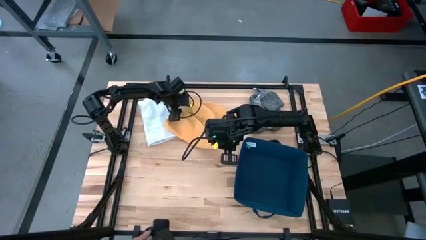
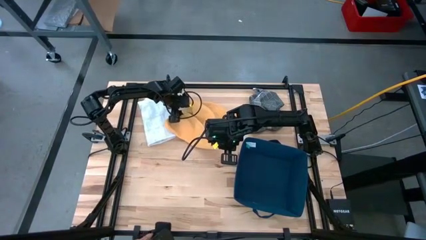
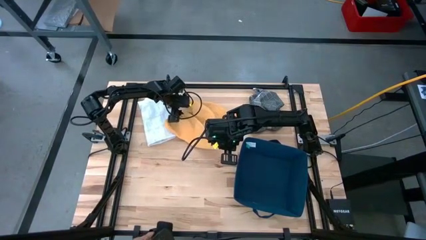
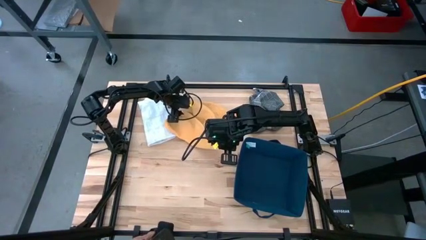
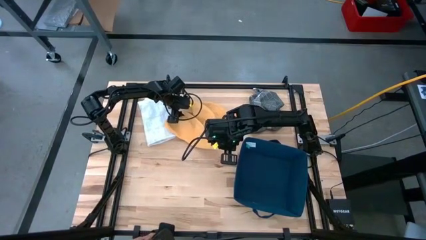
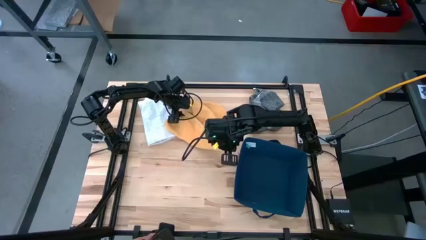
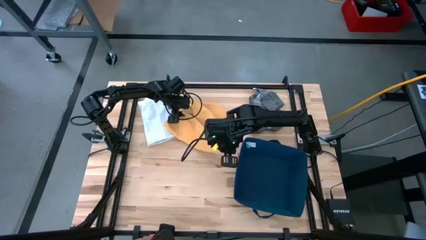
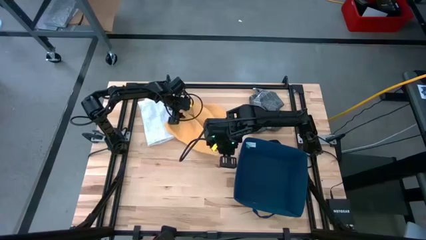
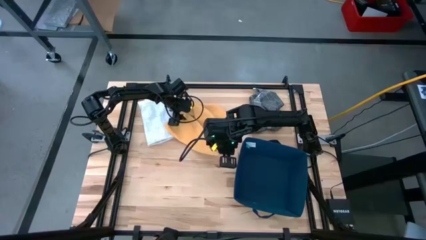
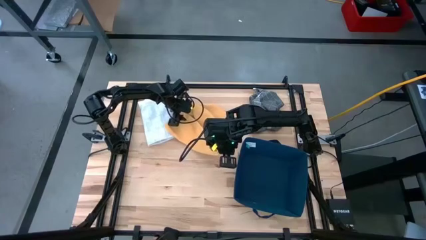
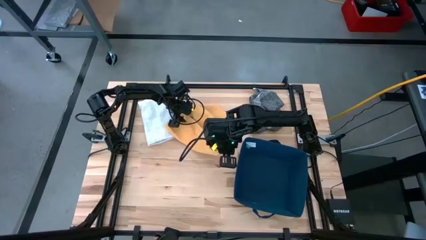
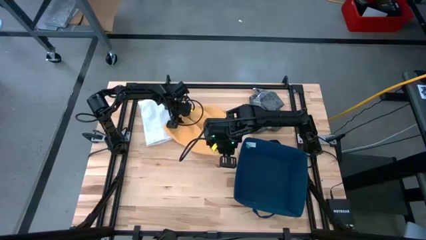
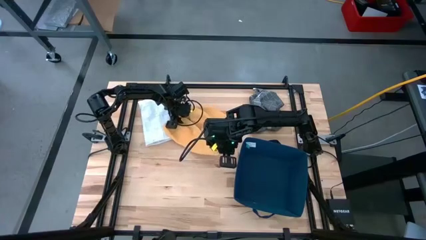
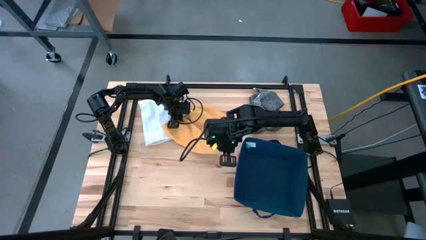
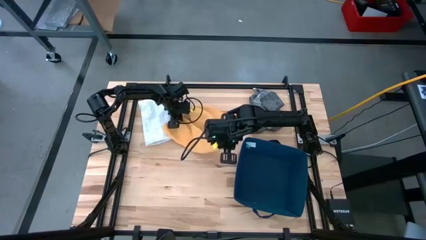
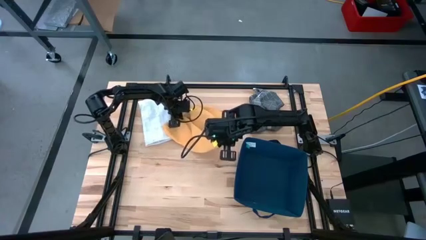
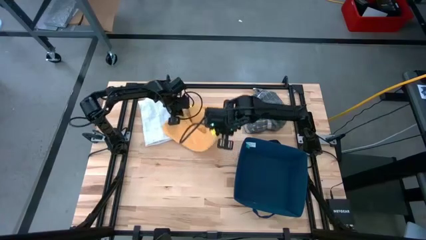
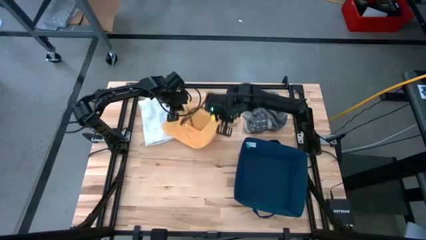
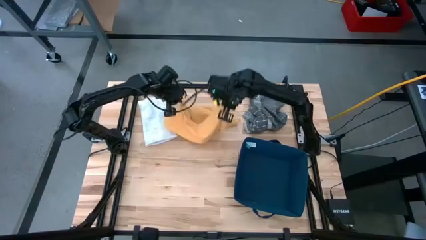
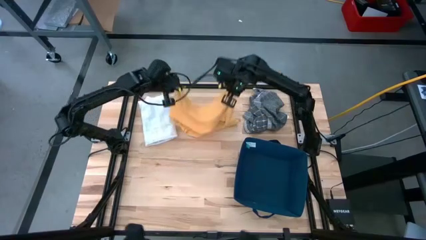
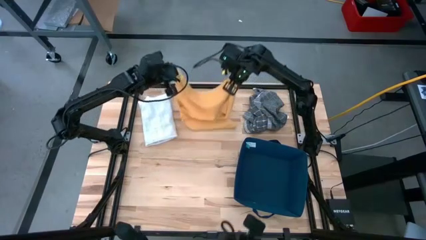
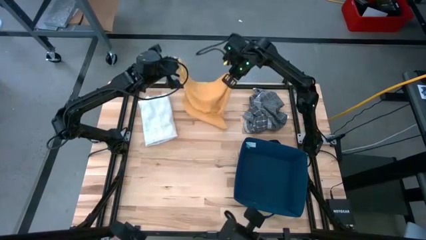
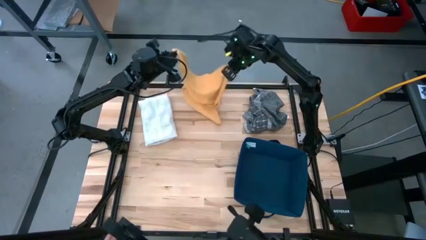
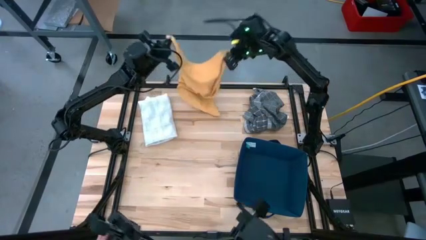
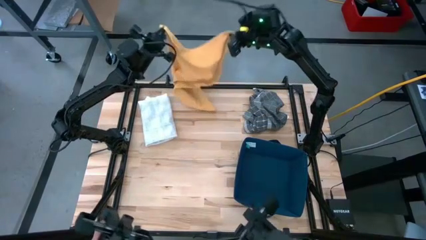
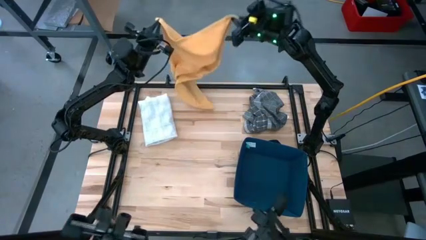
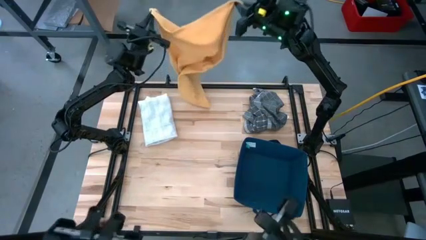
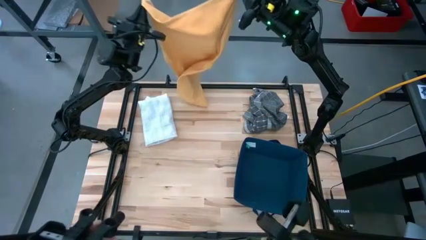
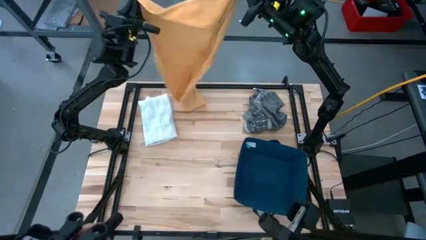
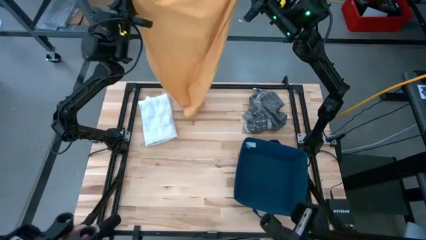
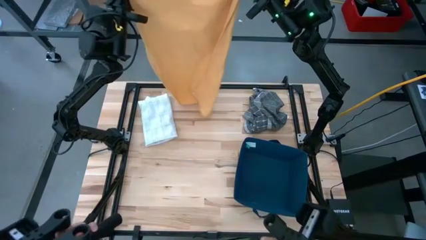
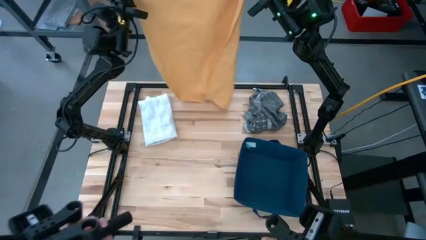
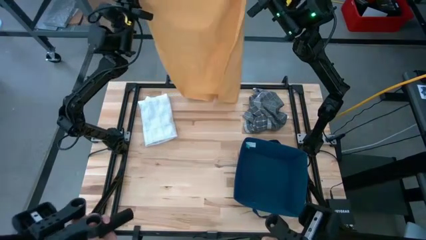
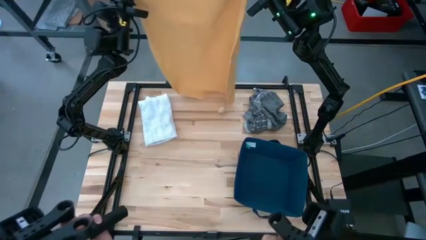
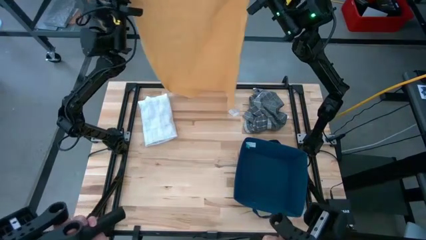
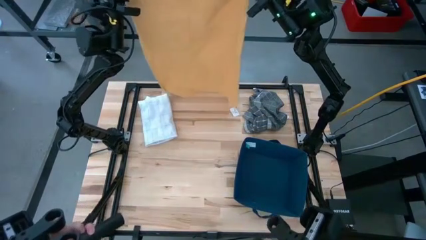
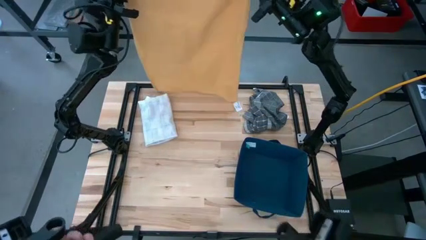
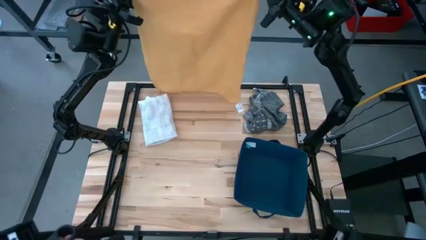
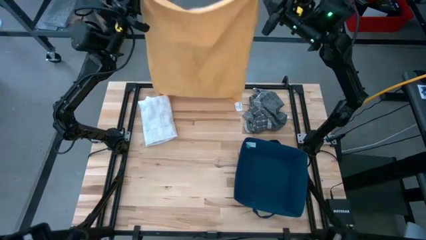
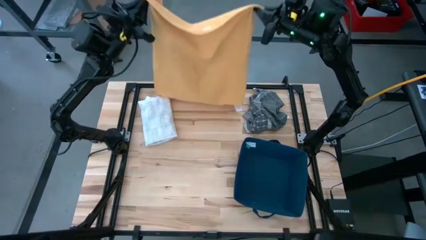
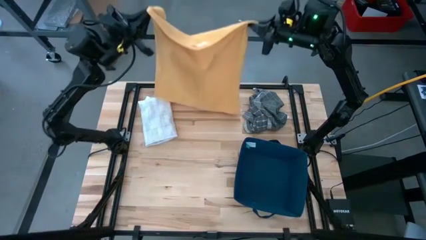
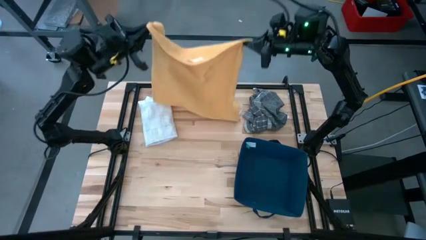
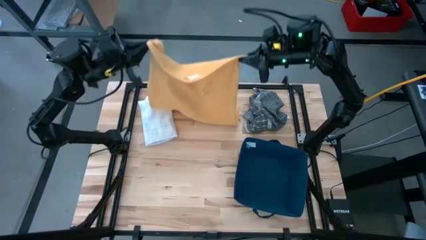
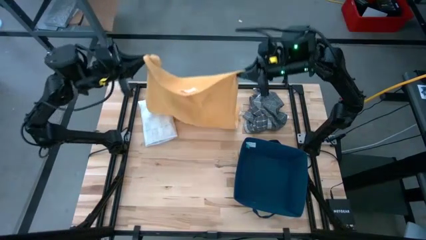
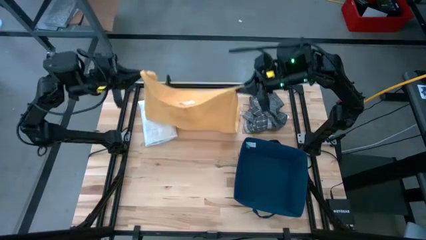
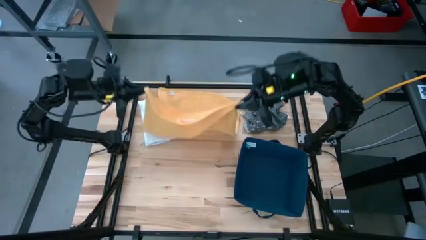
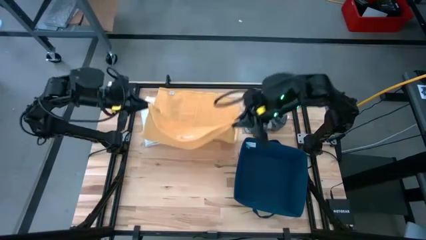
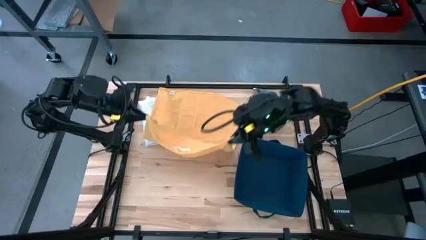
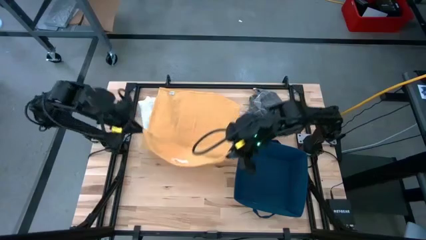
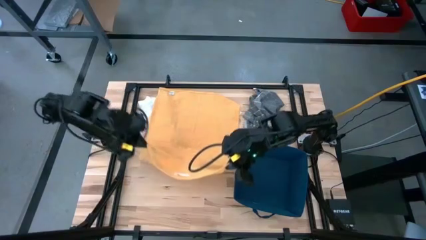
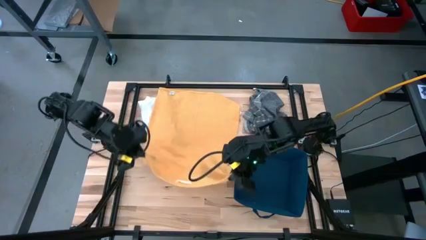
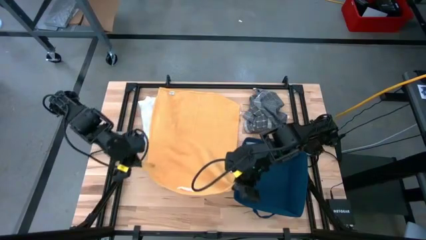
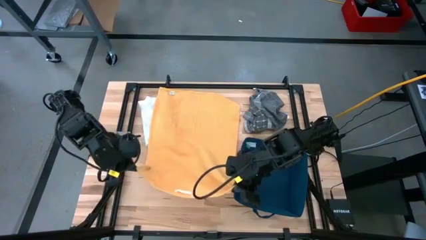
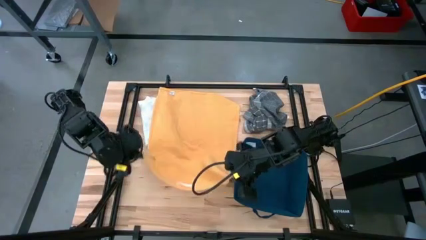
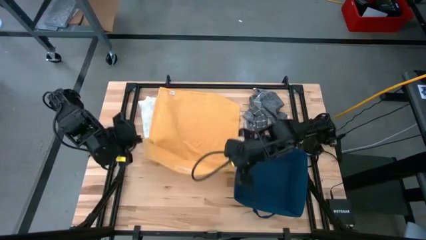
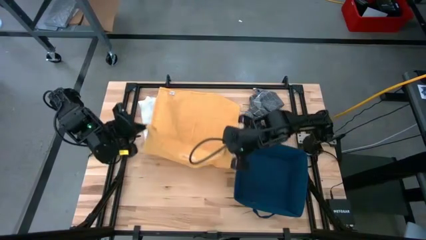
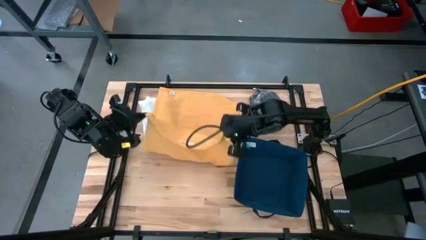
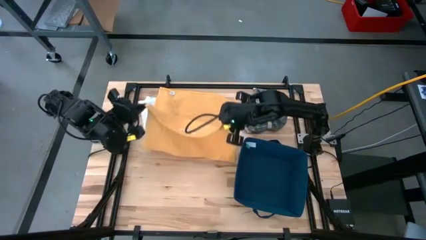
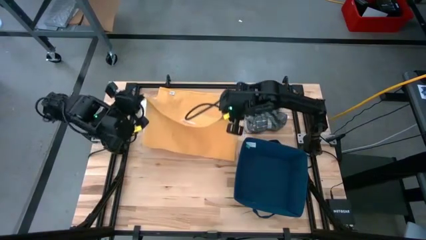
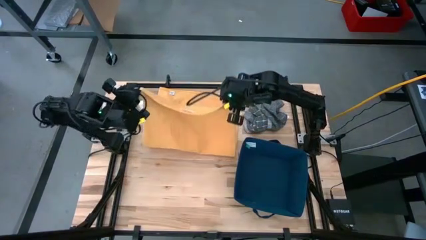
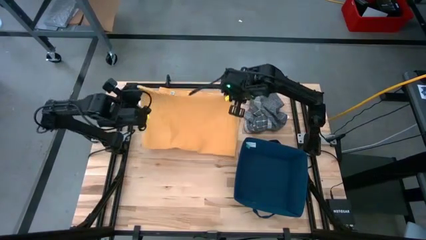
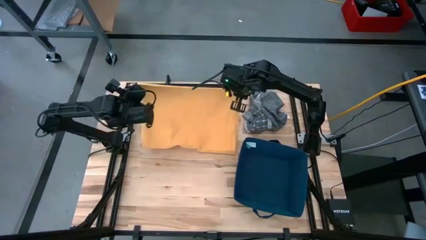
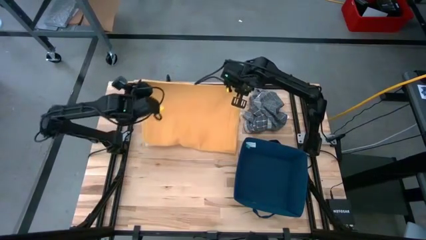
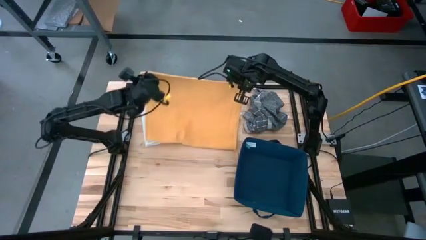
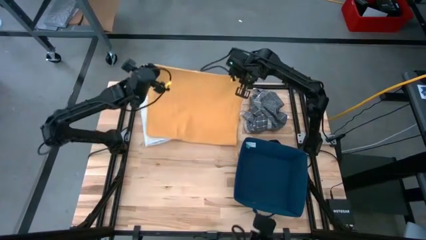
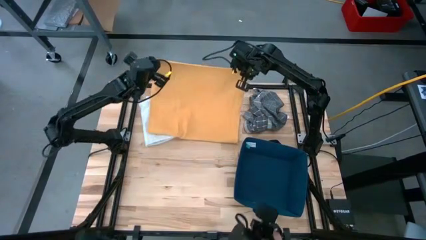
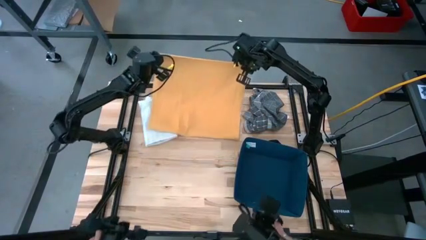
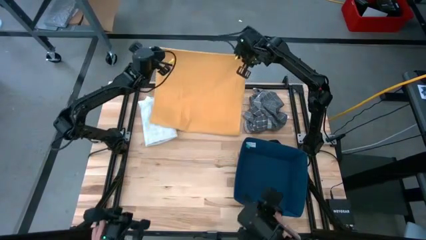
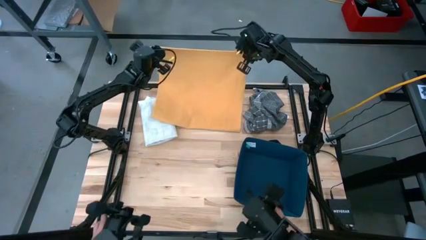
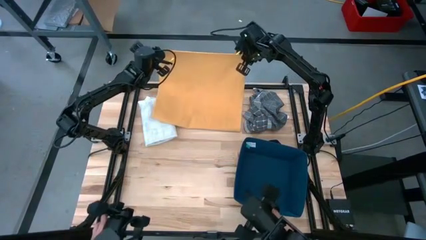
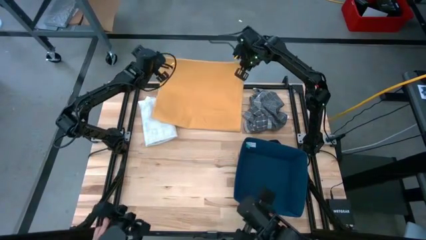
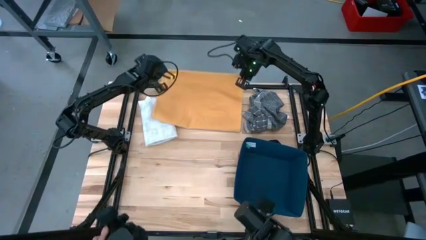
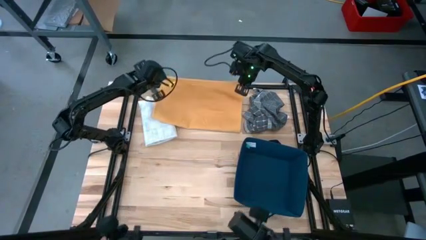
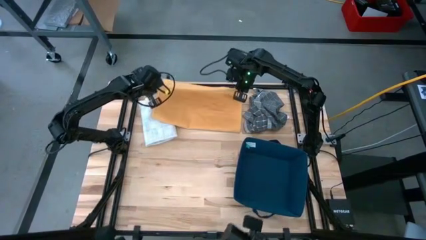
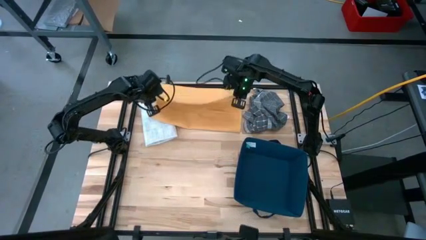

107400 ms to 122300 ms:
Task: Fold towel
Fold the yellow towel

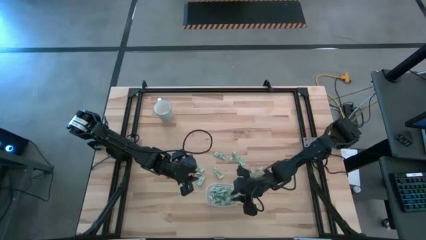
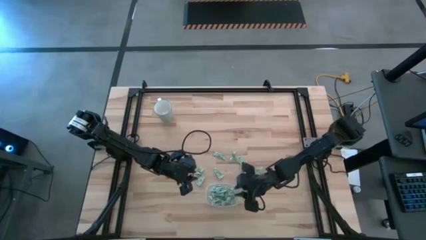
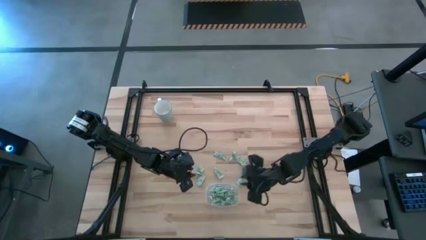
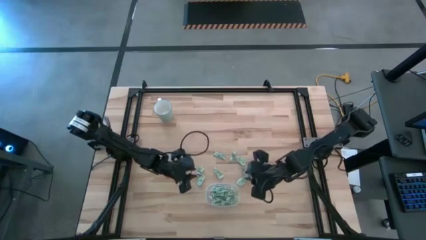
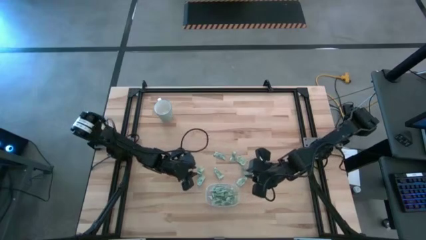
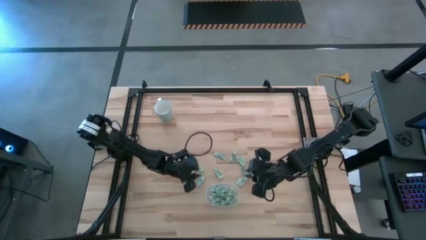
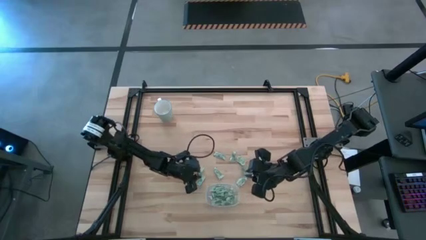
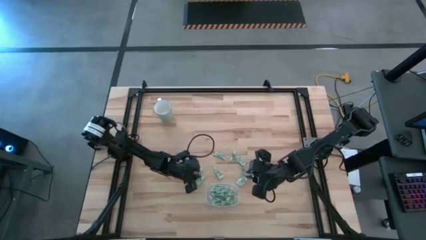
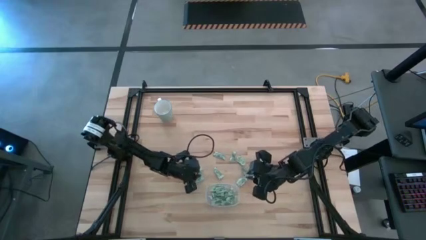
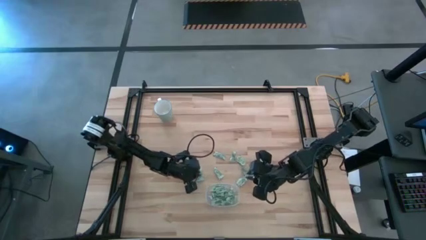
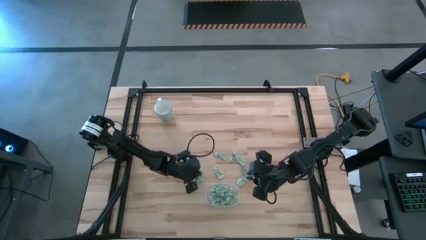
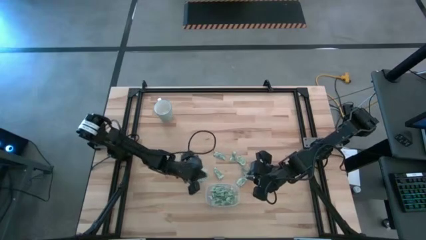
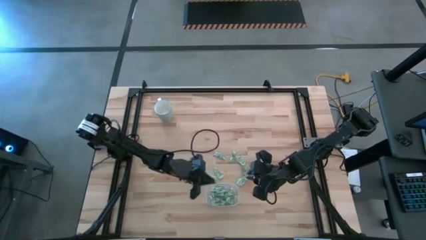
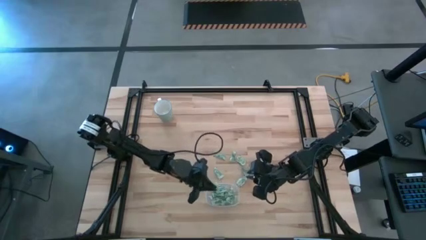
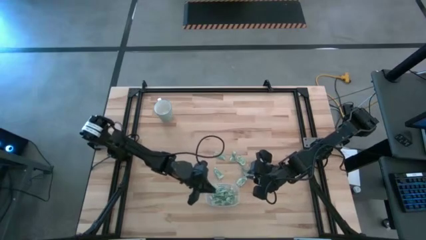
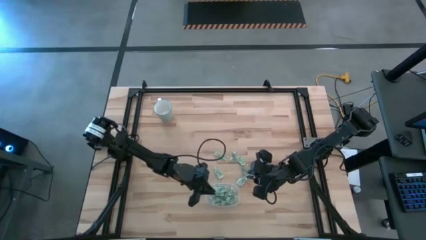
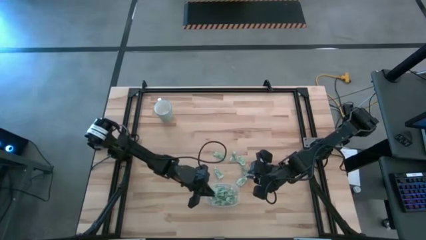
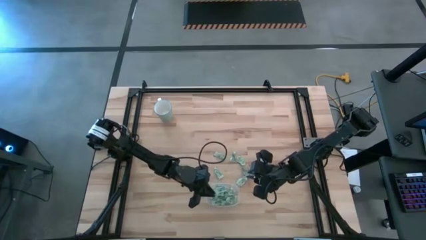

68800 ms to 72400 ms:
Task: Pick and place Stevia / Truvia into bins
Put the stevia packet into the transparent container
